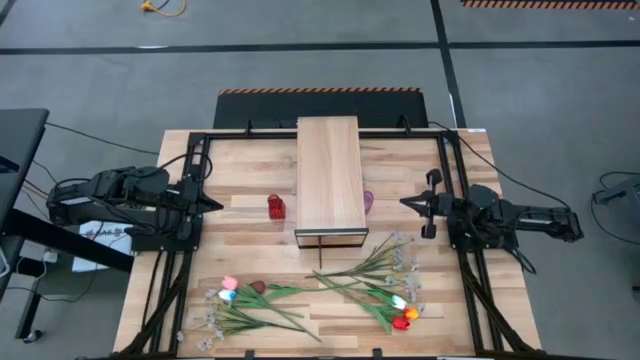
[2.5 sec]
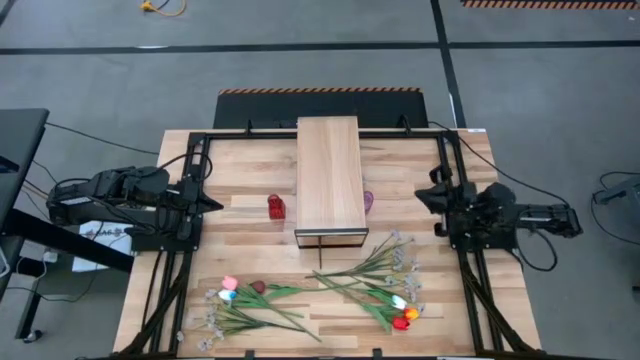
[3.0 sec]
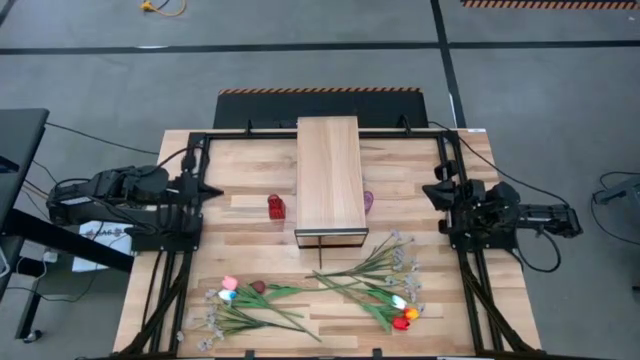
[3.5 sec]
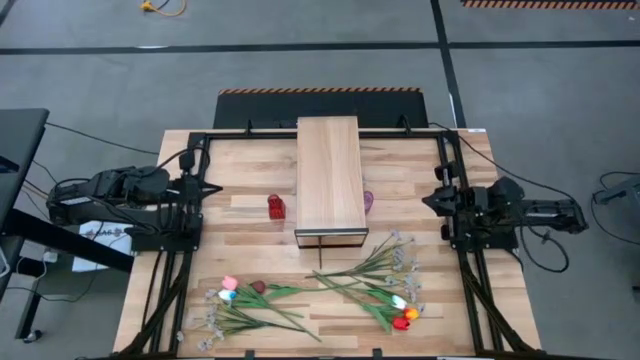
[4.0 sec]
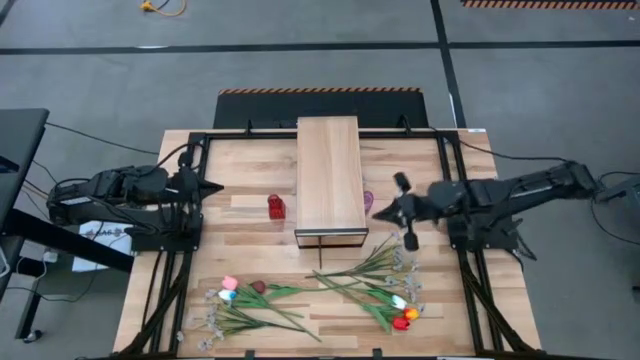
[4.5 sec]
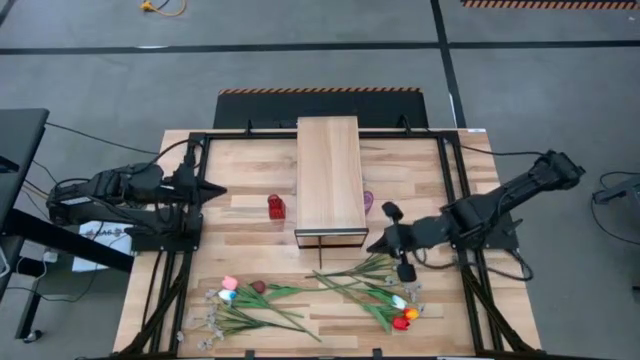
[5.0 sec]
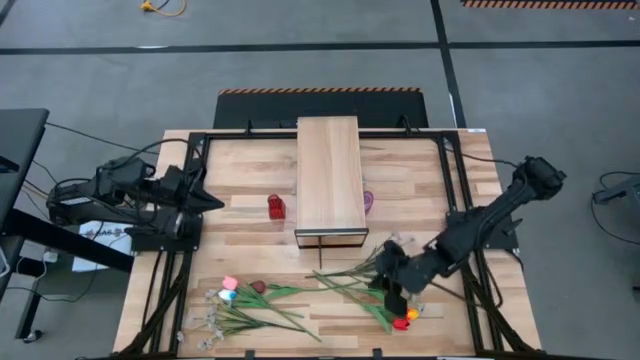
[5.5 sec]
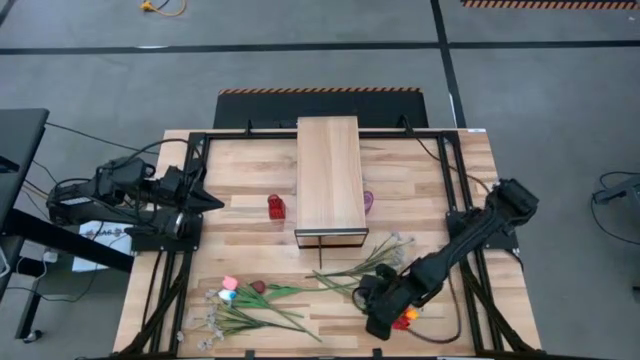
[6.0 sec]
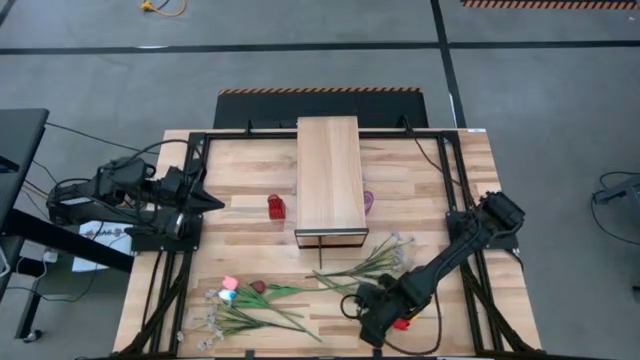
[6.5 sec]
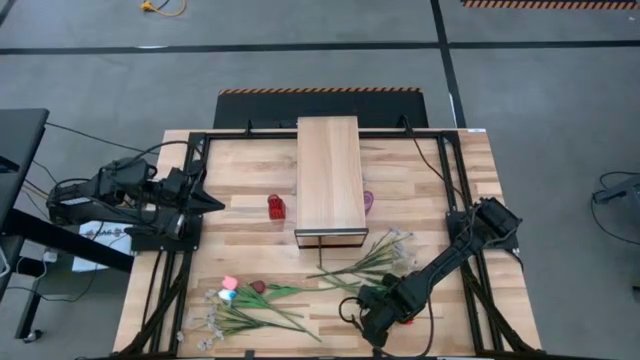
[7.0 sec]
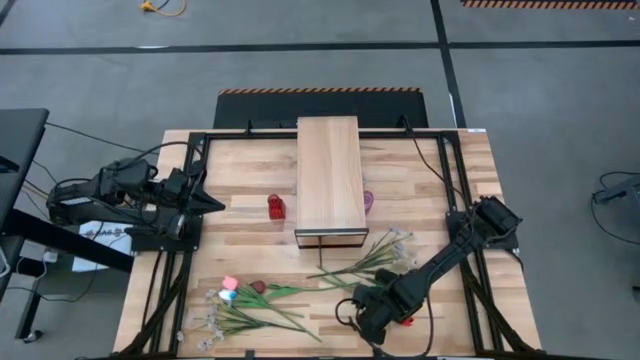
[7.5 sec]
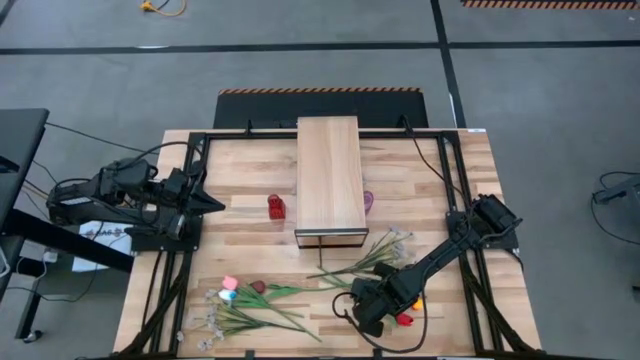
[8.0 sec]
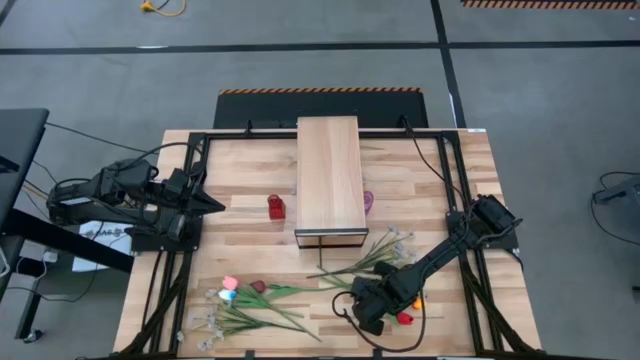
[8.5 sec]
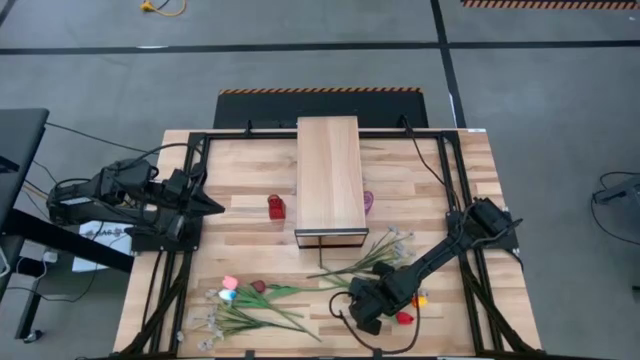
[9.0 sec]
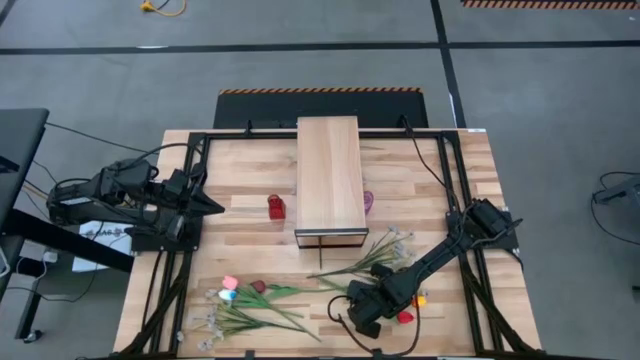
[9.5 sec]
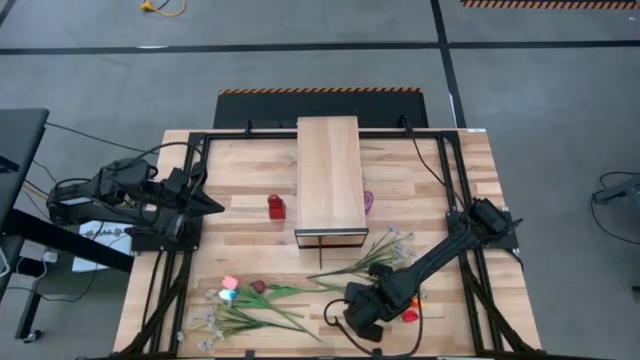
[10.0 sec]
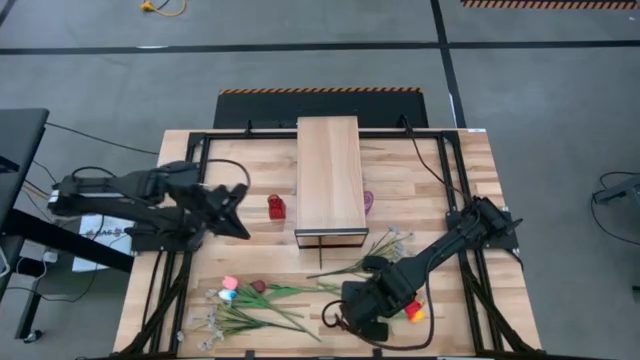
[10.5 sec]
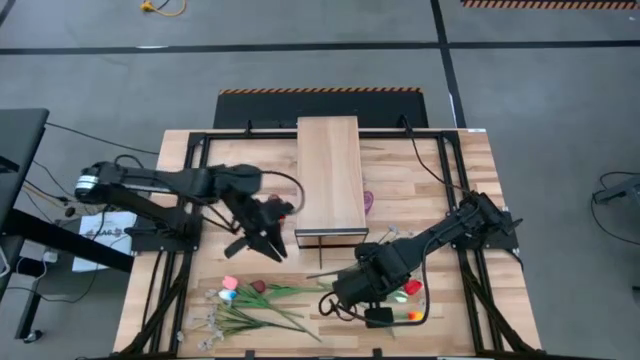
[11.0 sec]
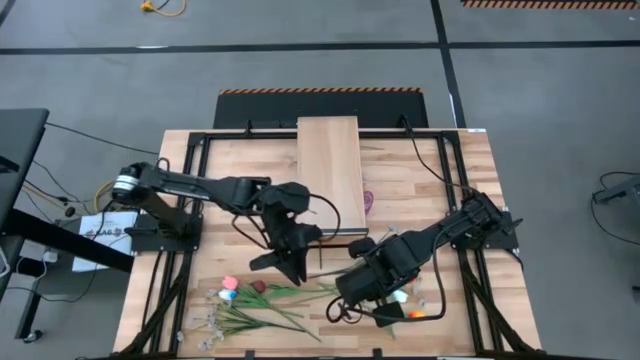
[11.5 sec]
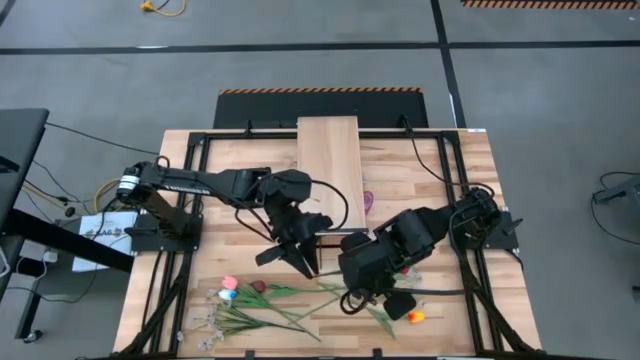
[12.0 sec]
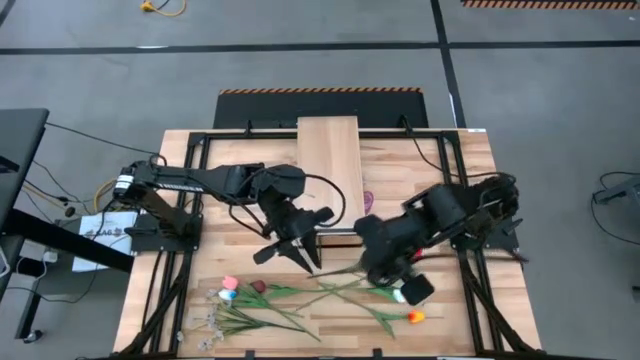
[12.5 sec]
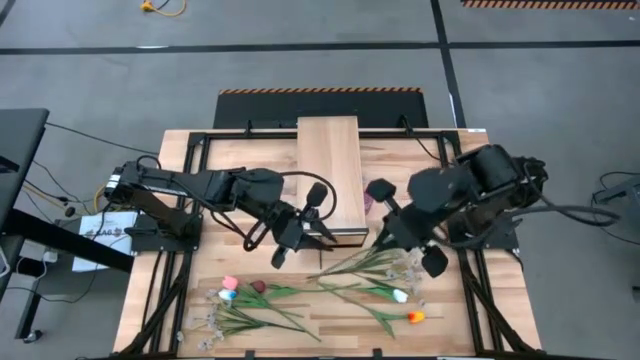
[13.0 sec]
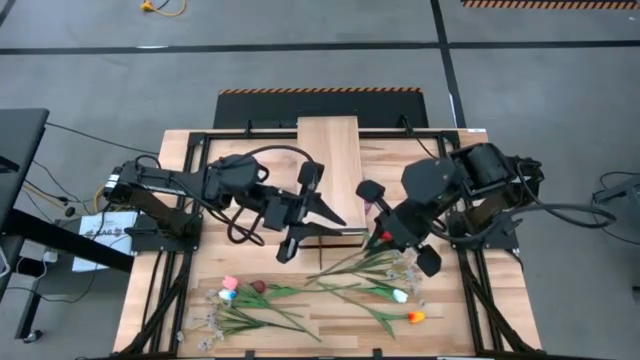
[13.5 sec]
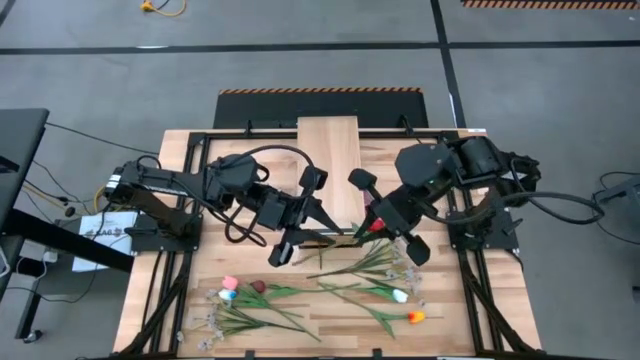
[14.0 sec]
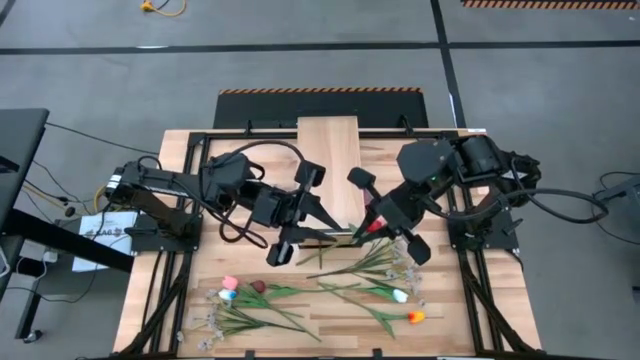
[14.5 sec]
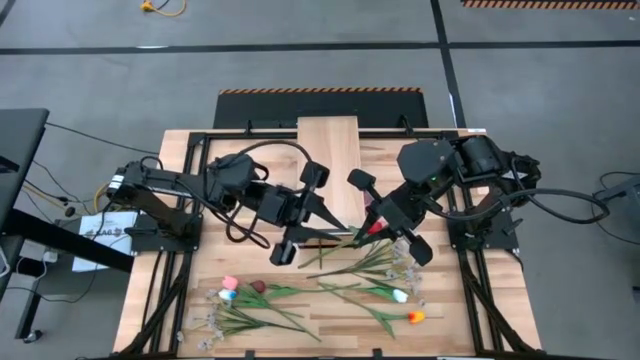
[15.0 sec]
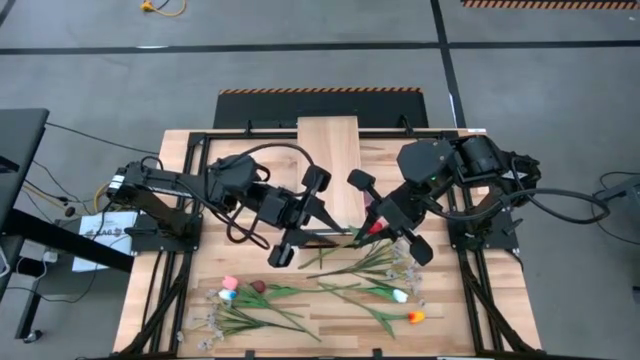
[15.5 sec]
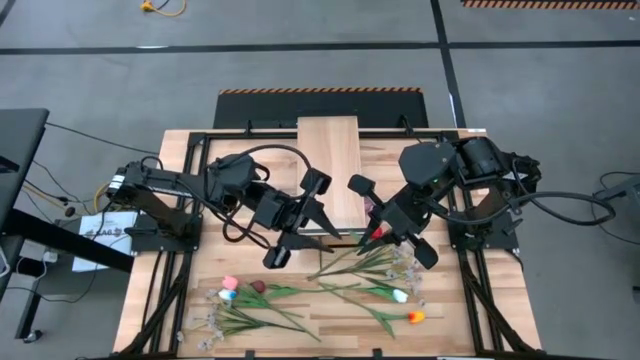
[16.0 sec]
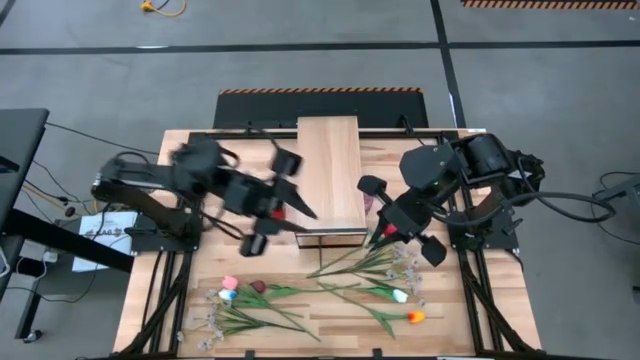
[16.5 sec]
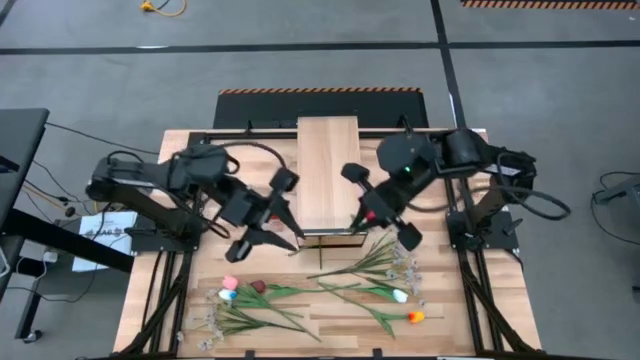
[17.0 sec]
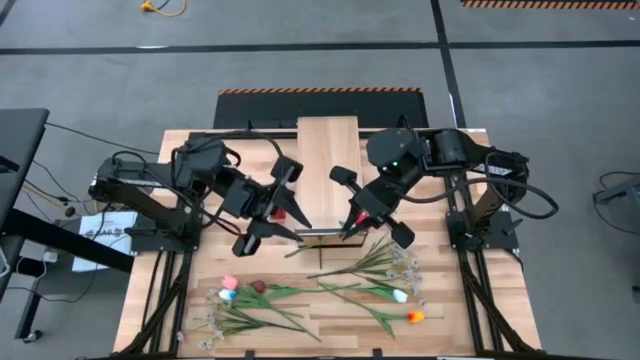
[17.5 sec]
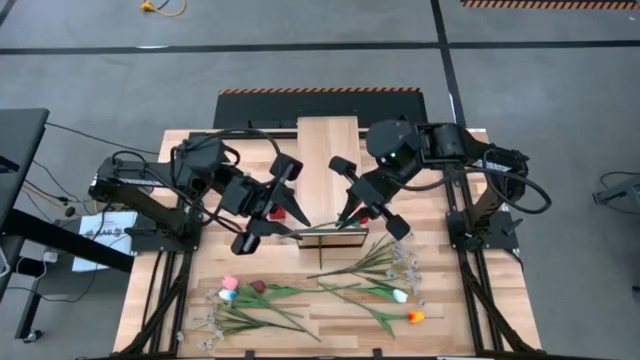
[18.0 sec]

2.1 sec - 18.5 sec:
Task: Pick and place flowers into a vace then onto a shelf
Put the red tulip into the red flower vase
